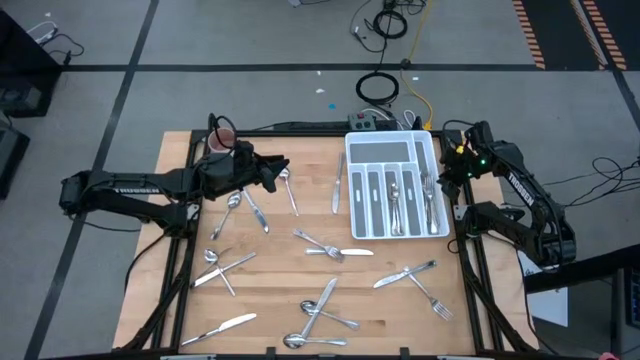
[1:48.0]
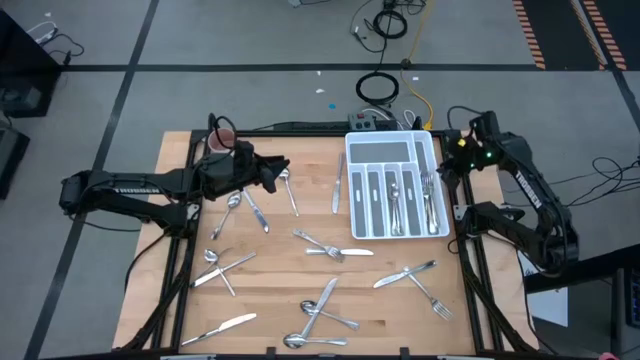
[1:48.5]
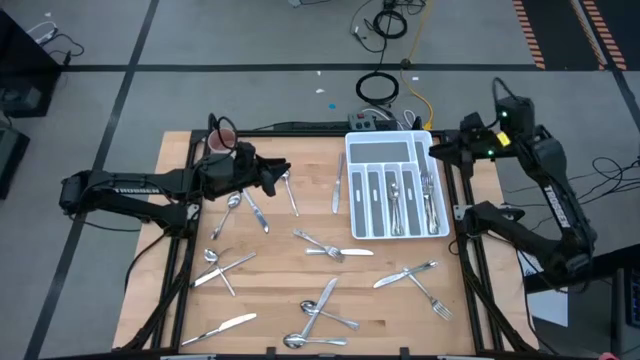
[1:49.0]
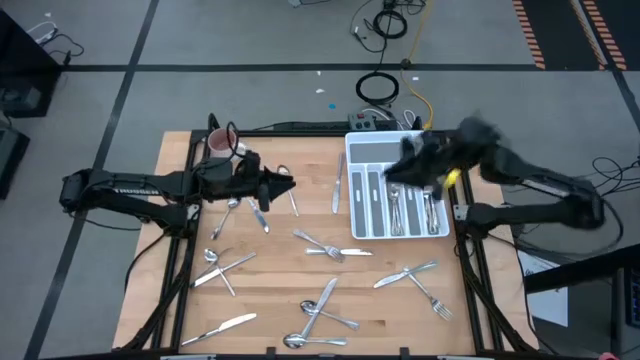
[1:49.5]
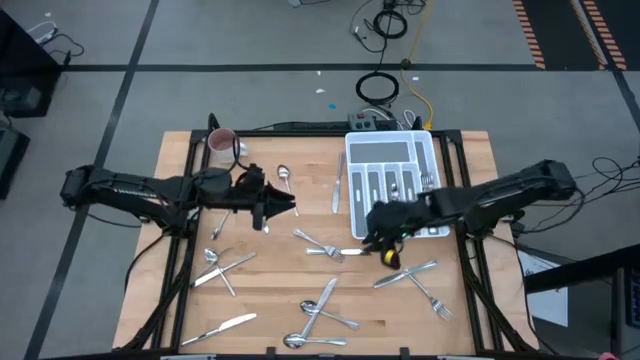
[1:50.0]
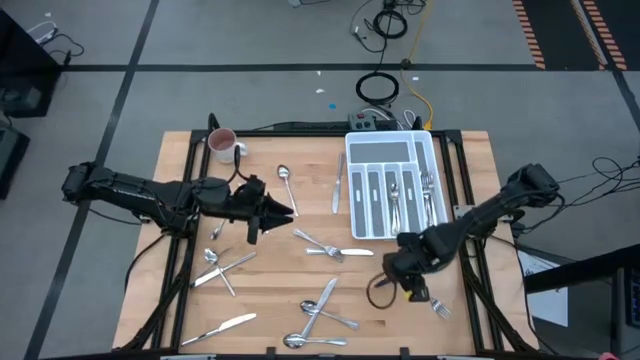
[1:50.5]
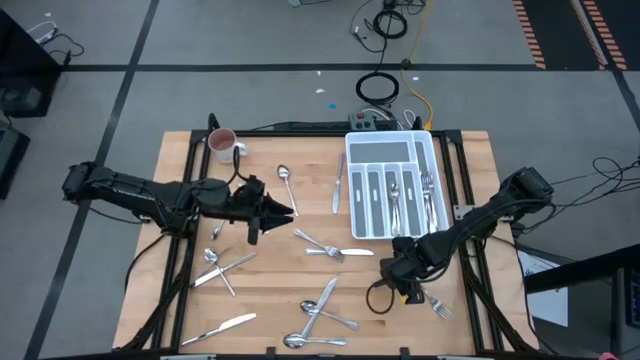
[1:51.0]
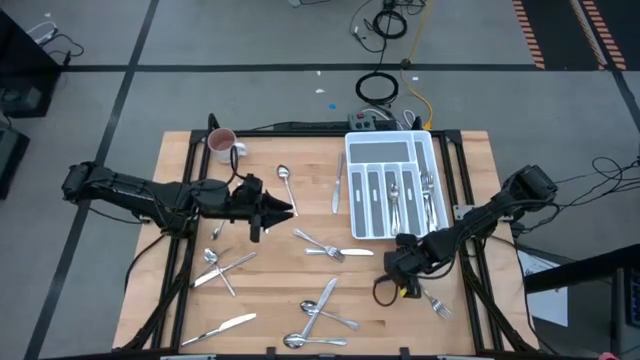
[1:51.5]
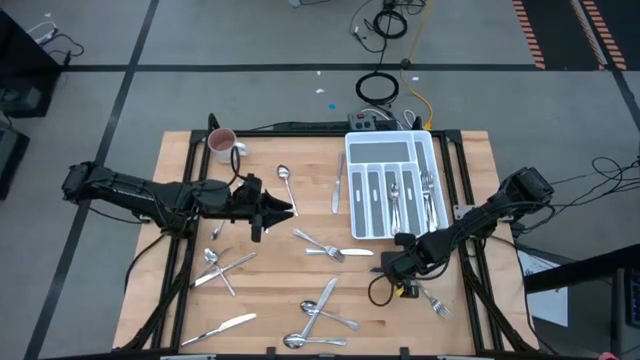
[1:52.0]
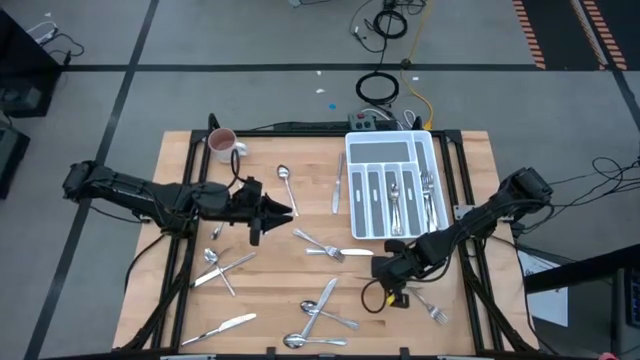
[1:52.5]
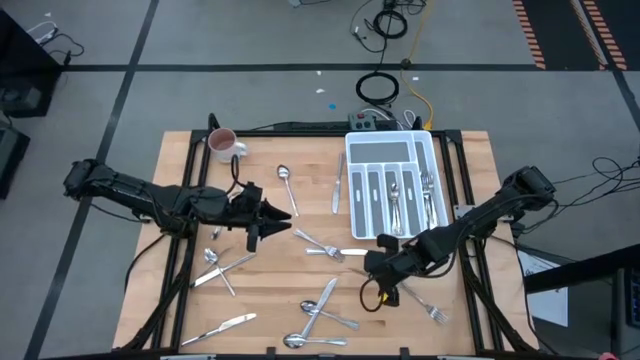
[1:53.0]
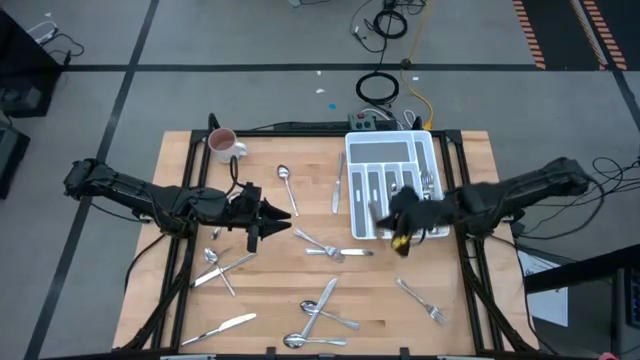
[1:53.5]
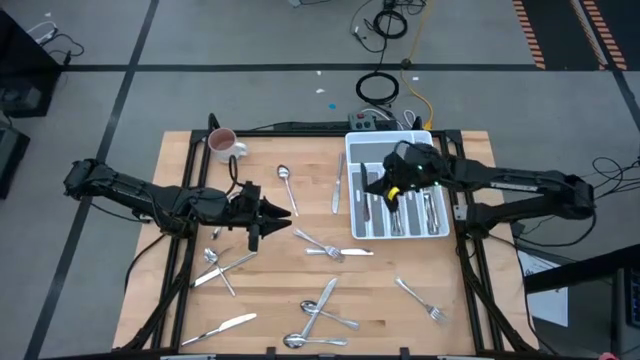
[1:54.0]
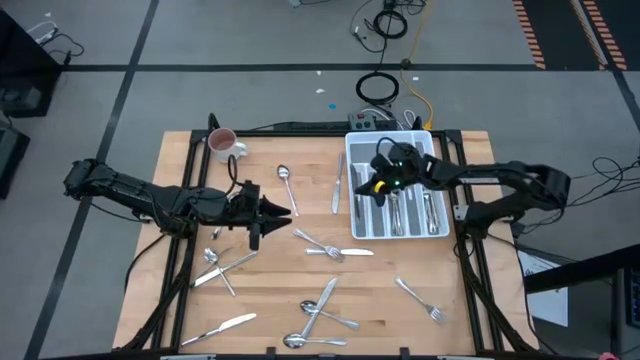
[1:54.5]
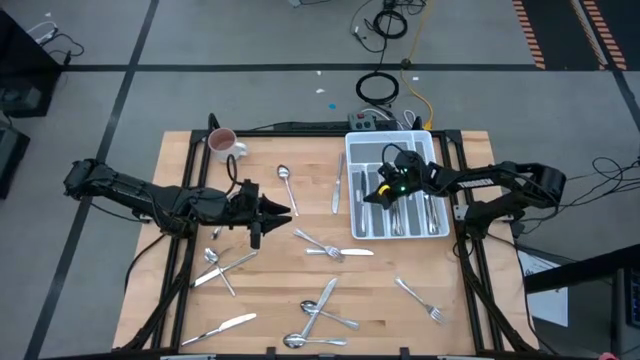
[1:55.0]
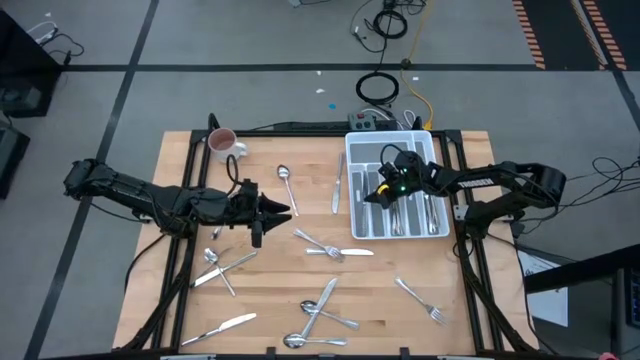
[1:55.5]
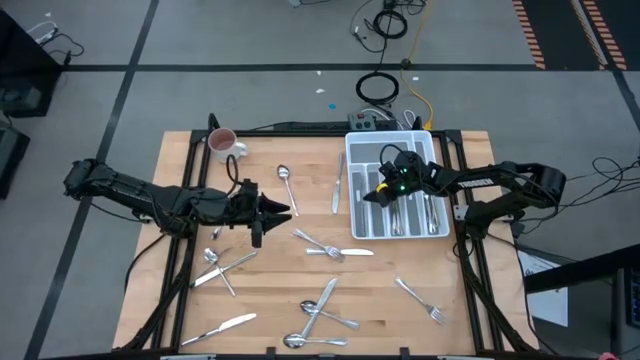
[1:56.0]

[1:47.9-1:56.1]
Task: Sort silverware
Put the knife in the left section of the silverware tray

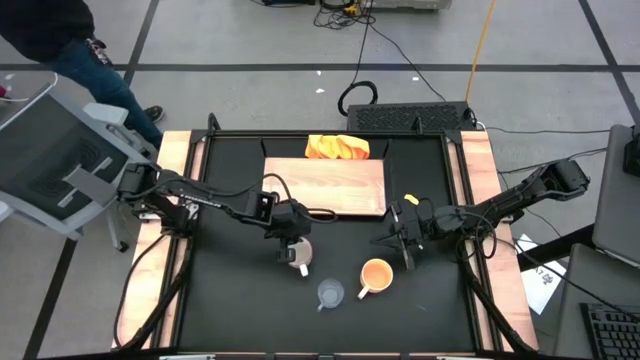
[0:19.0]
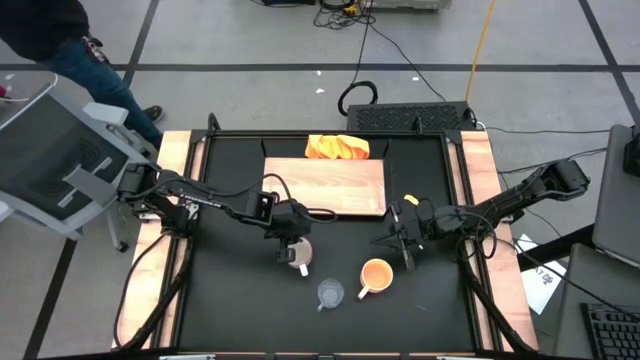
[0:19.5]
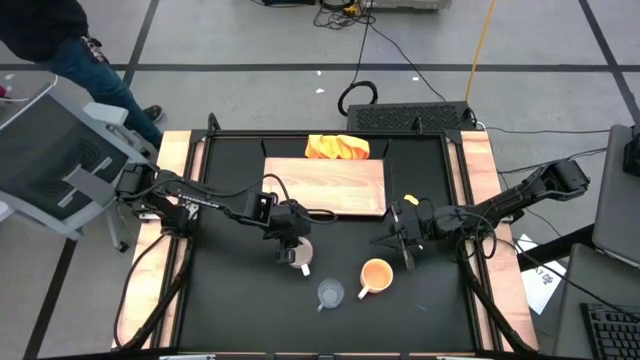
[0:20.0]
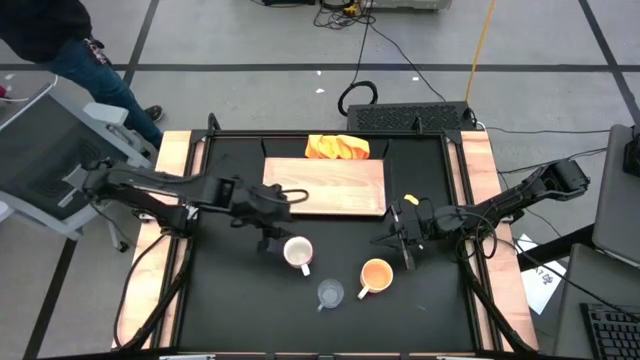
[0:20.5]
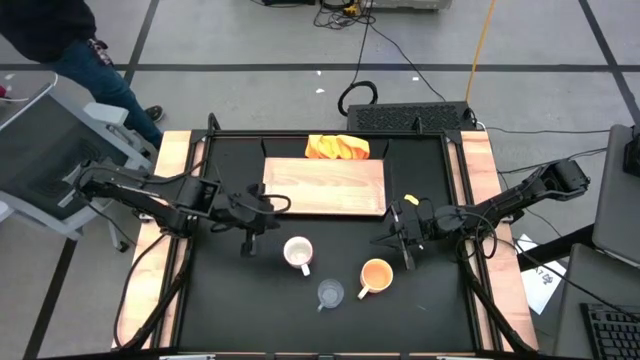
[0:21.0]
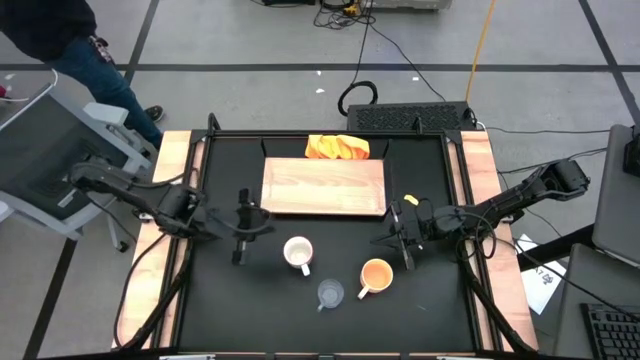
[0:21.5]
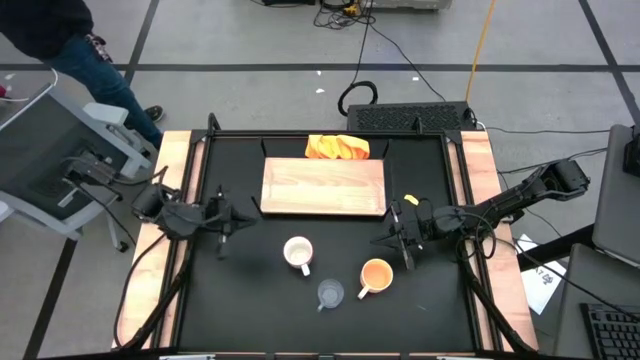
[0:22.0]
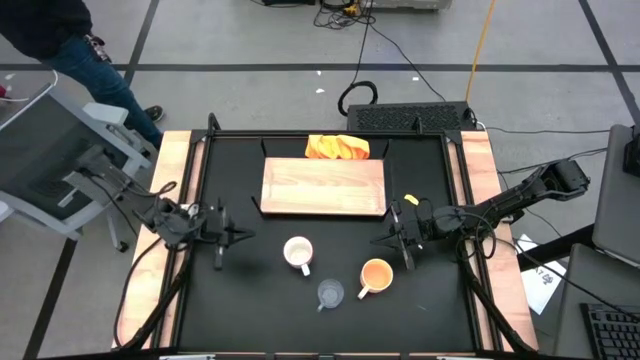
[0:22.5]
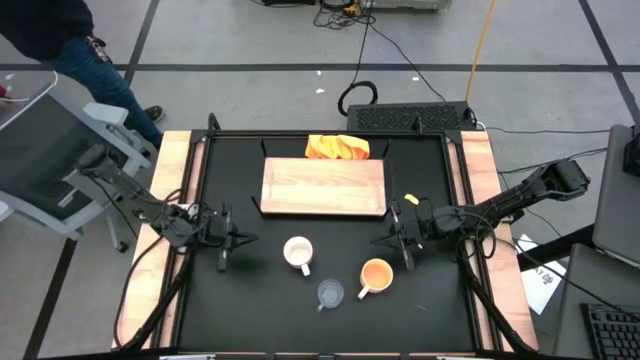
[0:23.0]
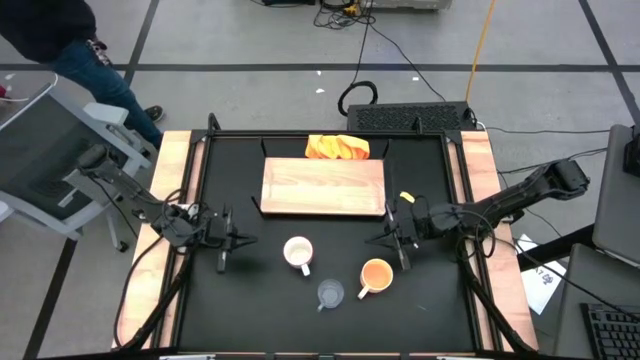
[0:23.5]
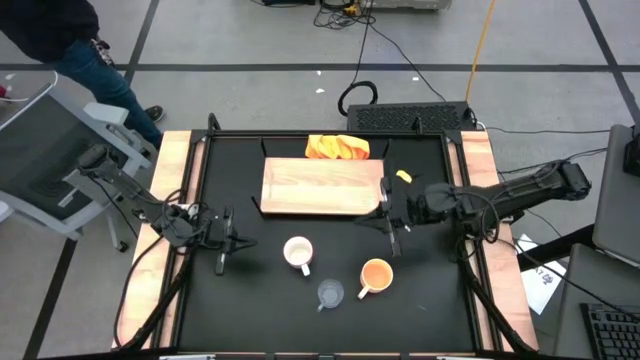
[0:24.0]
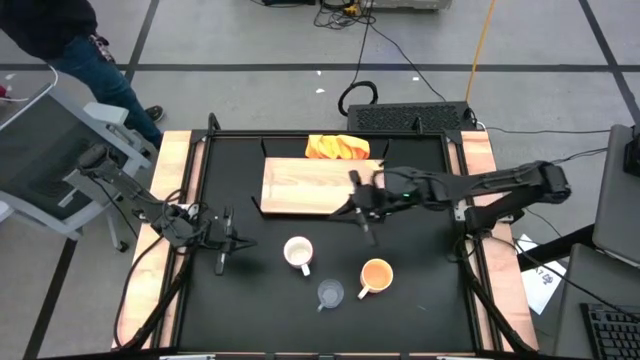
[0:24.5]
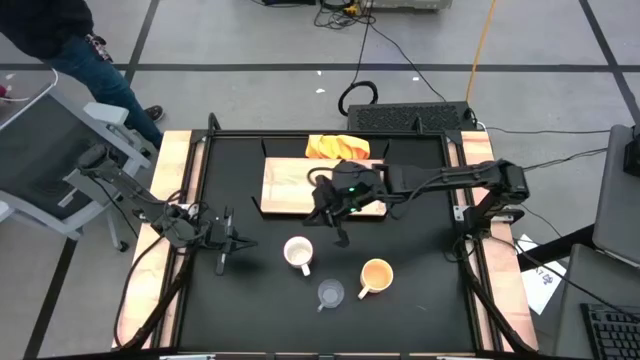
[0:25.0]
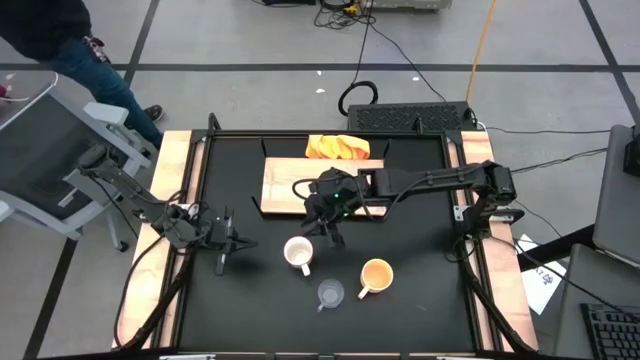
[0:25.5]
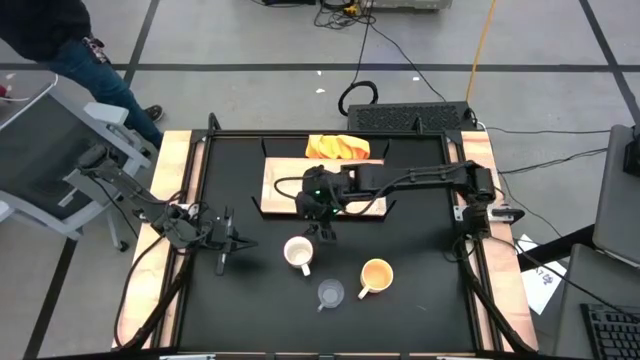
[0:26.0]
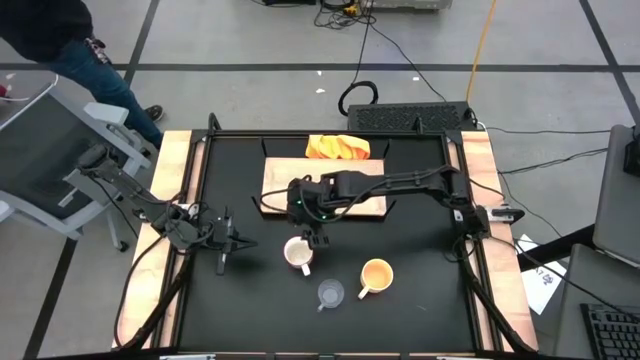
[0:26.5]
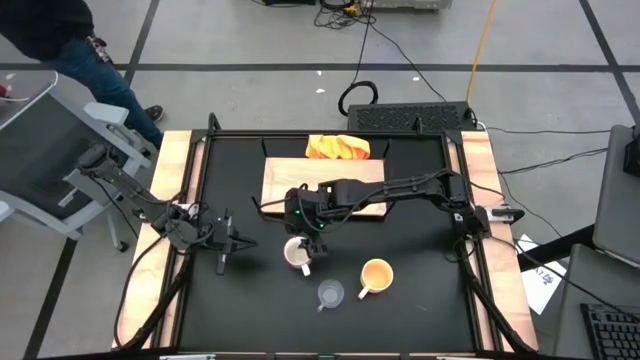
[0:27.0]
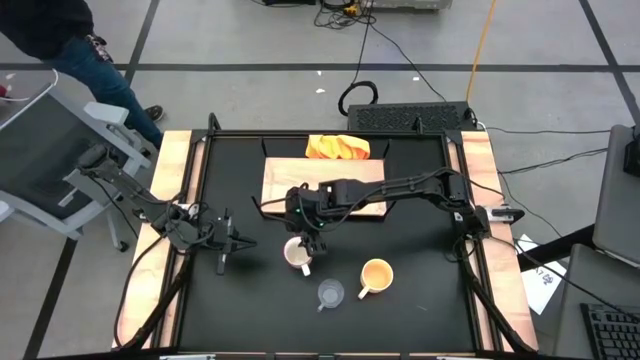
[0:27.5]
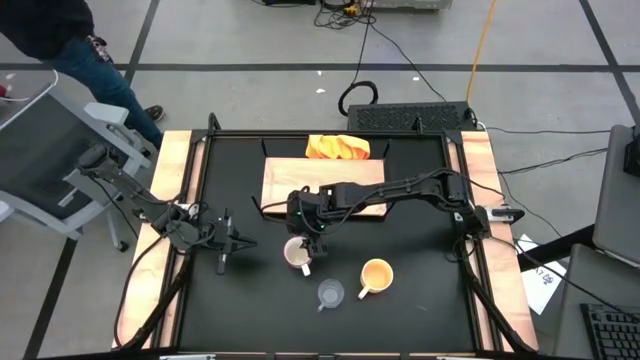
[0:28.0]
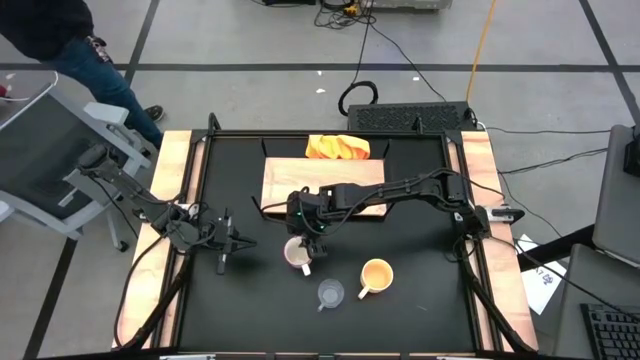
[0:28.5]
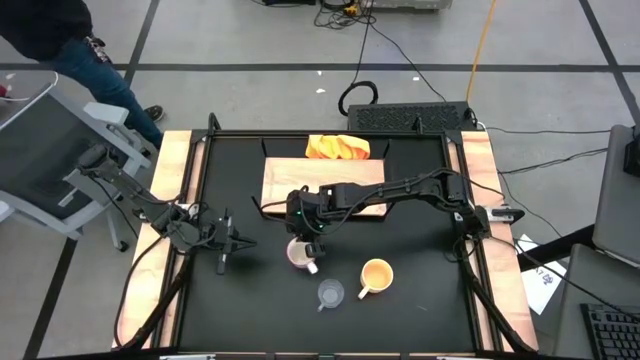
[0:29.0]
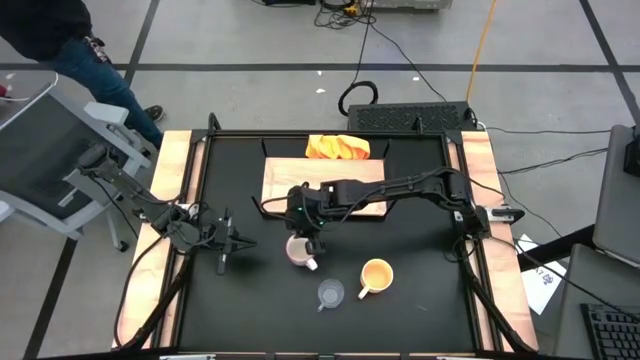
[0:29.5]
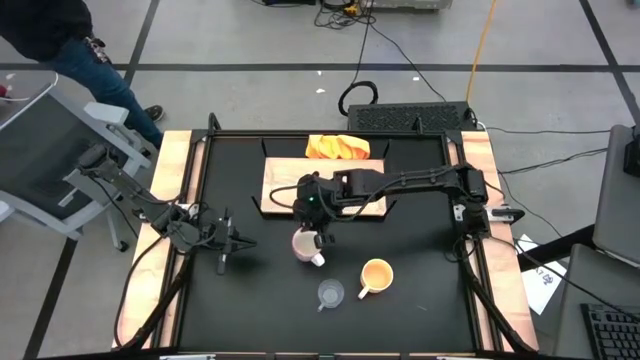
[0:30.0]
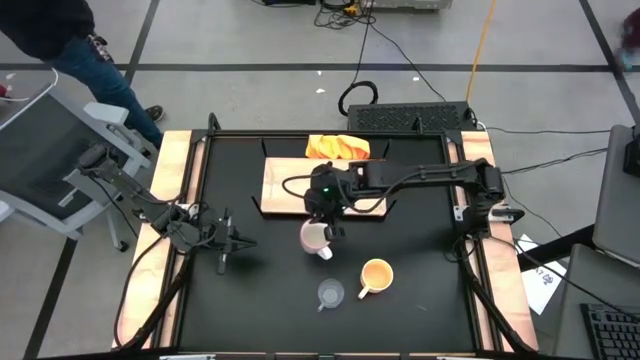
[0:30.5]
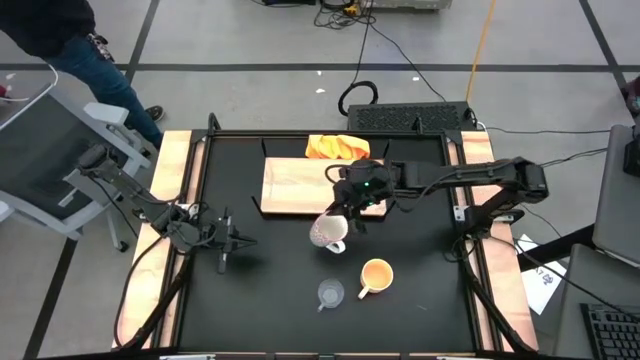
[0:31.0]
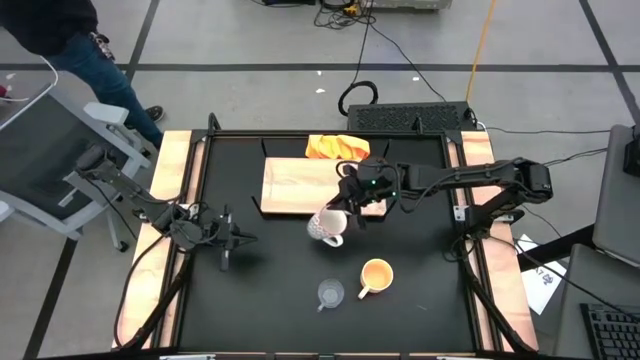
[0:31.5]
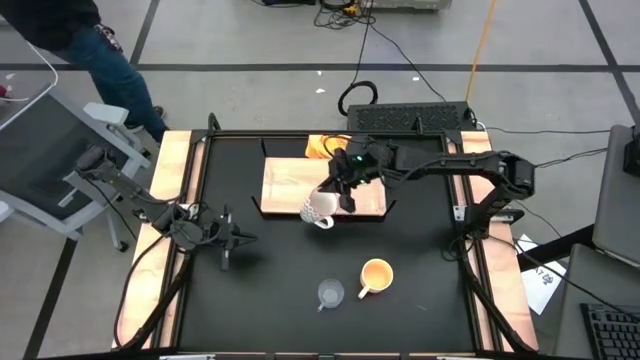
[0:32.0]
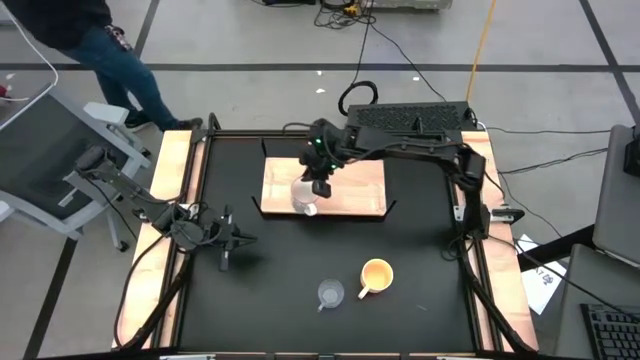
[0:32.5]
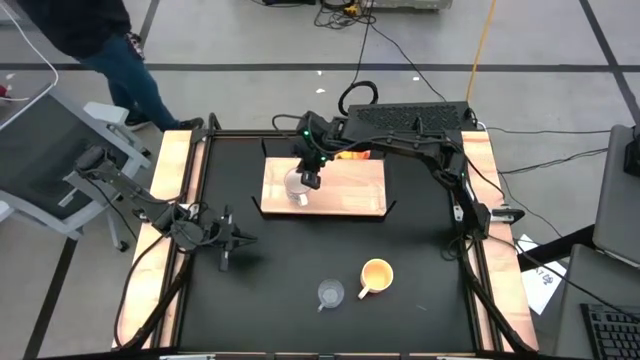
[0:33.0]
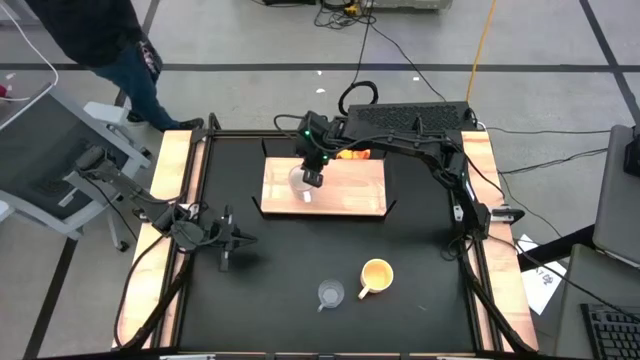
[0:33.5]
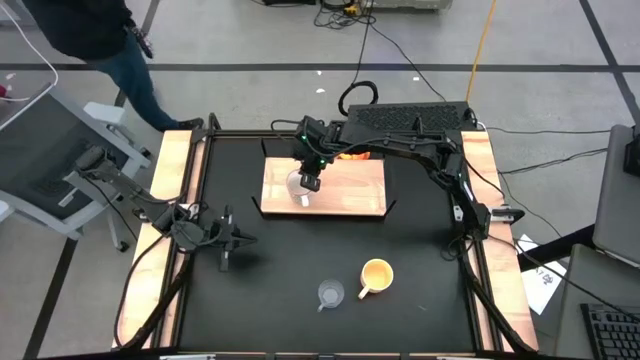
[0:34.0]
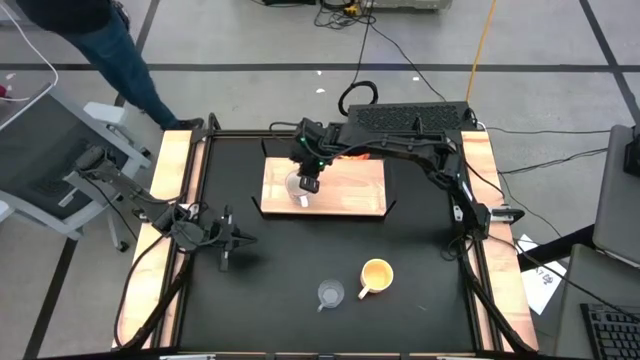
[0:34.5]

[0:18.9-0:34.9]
Task: Stack small to large cups/mugs on shelf
Put the grey cup on the shelf
